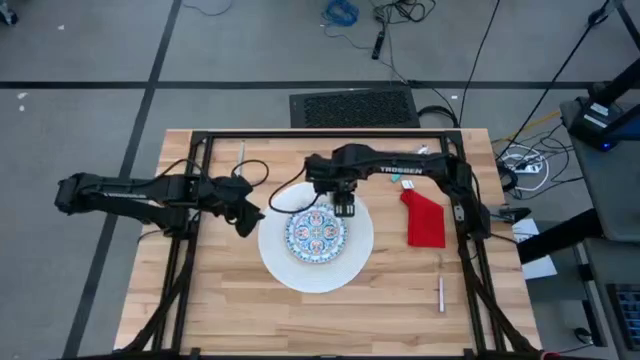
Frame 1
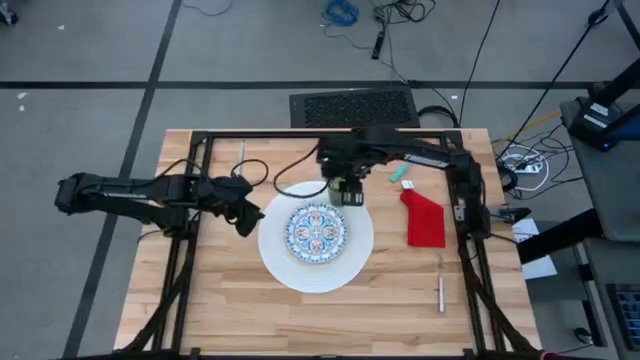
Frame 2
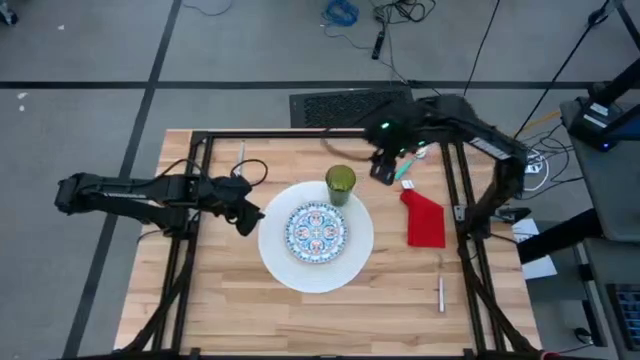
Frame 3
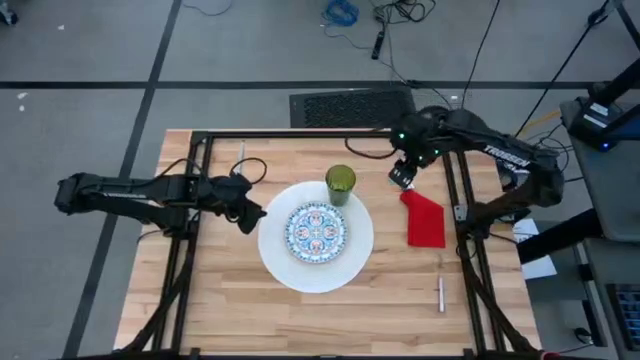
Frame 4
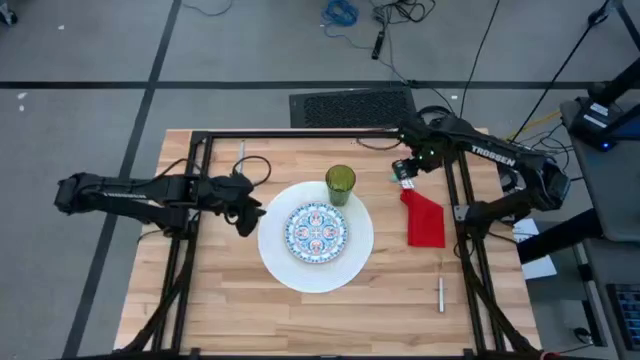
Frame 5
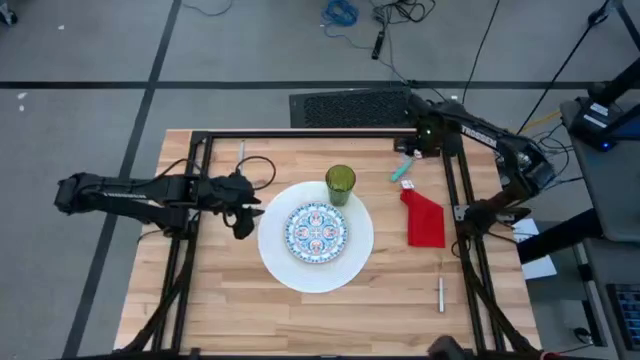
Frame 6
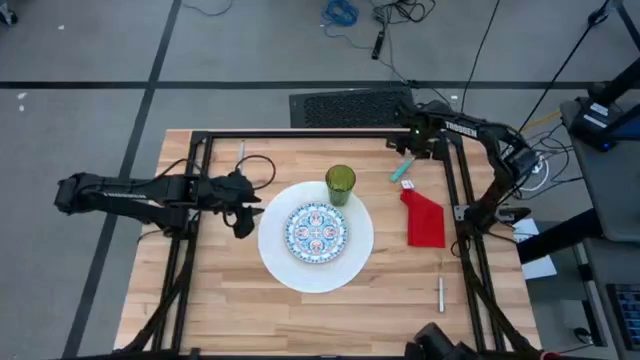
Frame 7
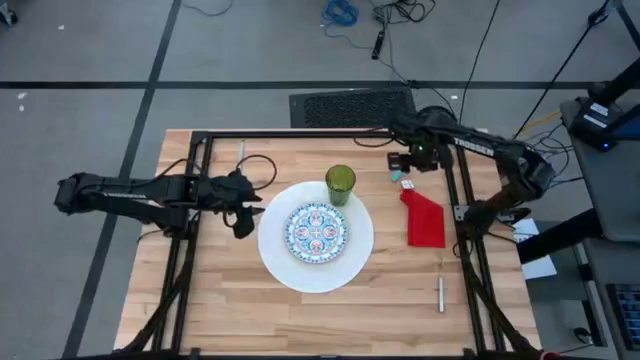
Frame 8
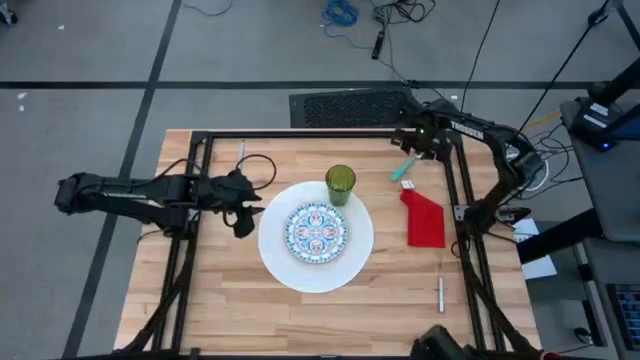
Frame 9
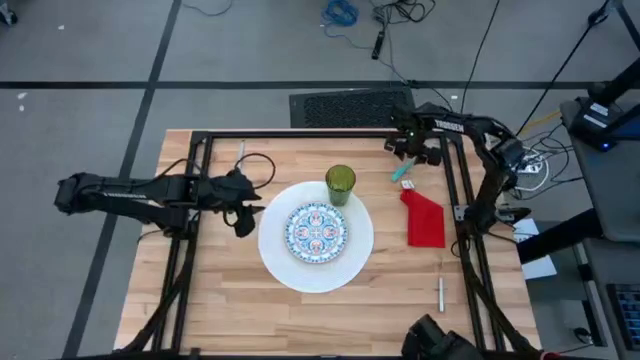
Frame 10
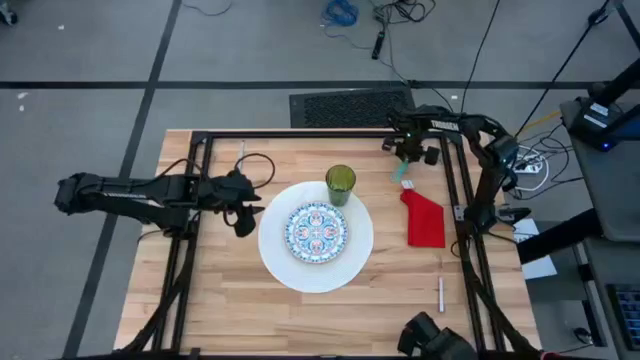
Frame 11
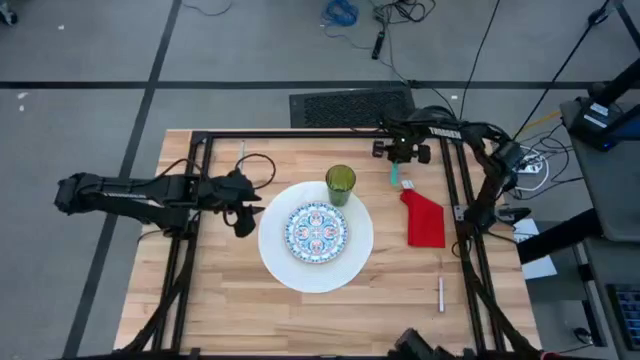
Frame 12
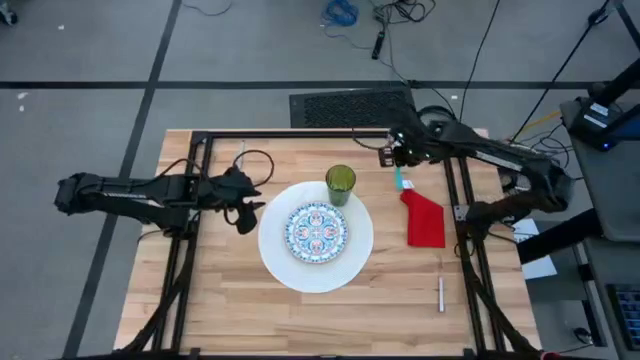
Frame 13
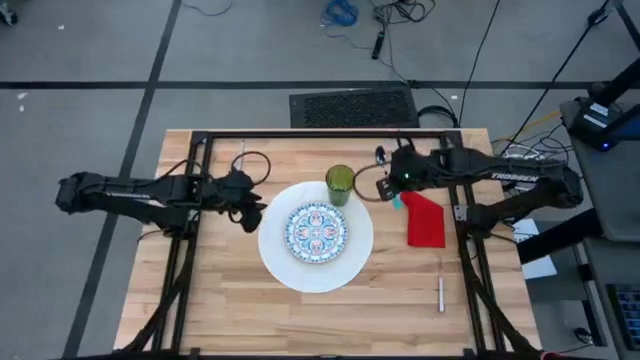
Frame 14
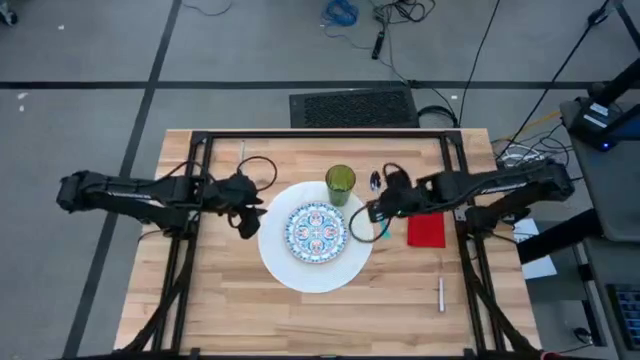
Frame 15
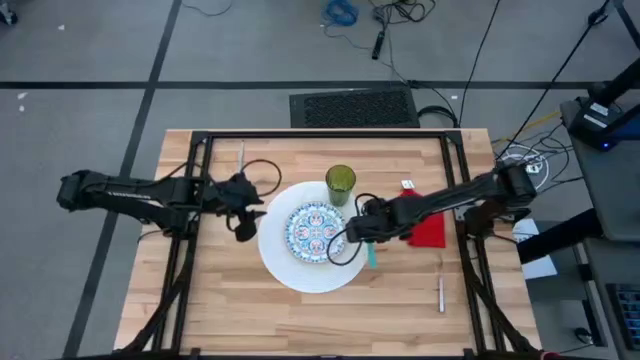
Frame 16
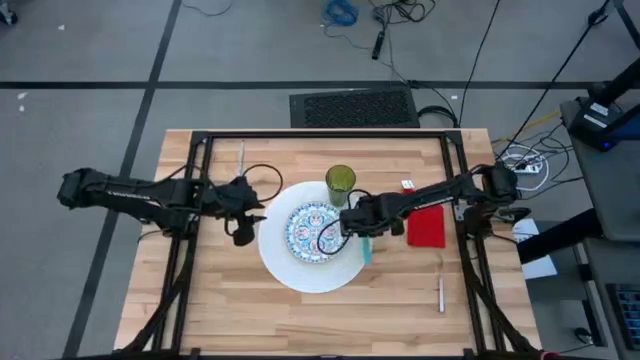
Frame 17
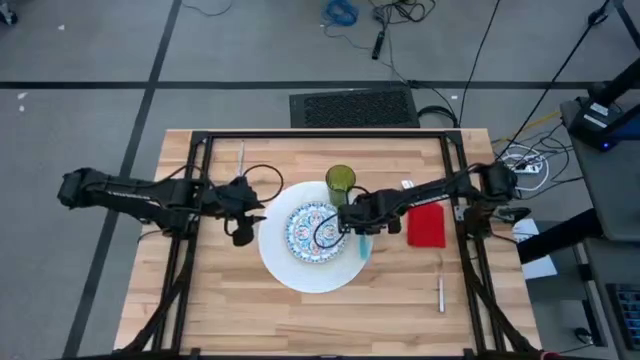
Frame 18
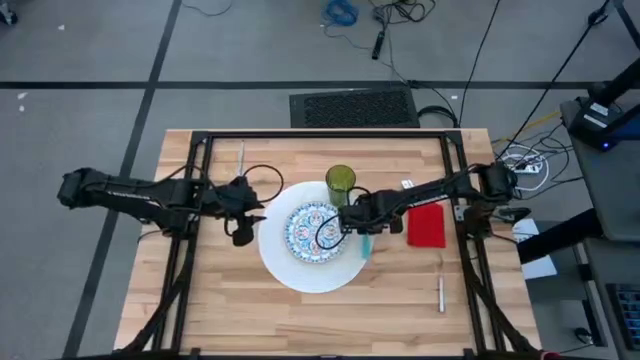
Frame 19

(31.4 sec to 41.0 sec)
Task: Set table place
Put the light blue spoon to the right side of the white plate on the white placemat

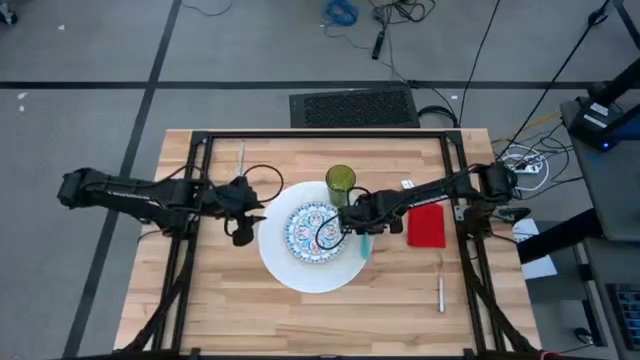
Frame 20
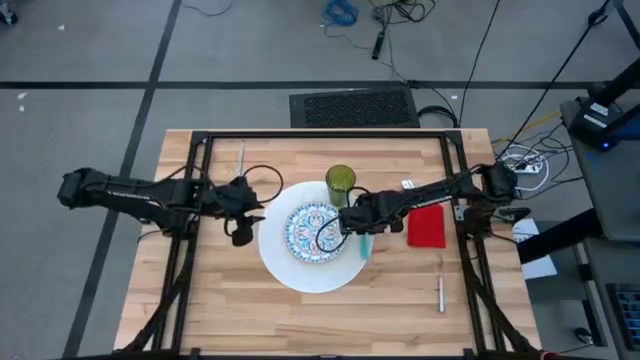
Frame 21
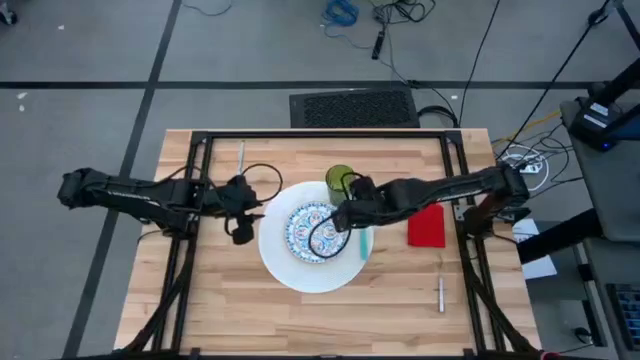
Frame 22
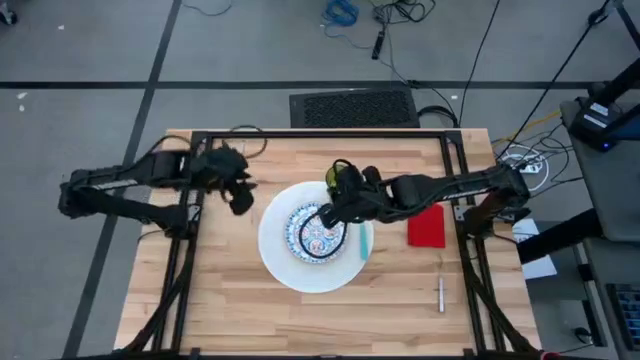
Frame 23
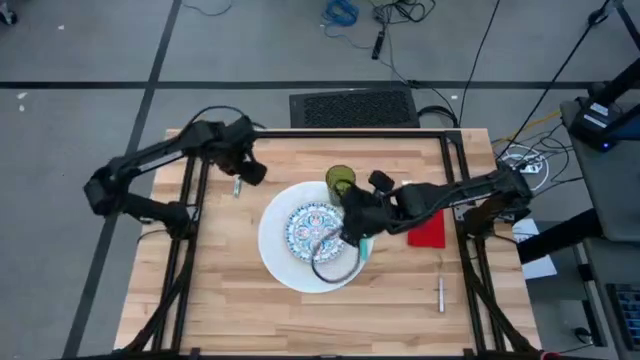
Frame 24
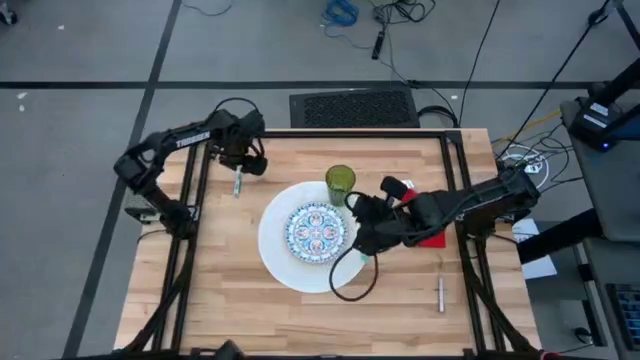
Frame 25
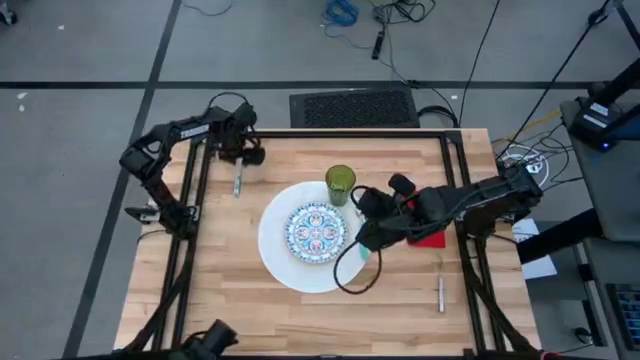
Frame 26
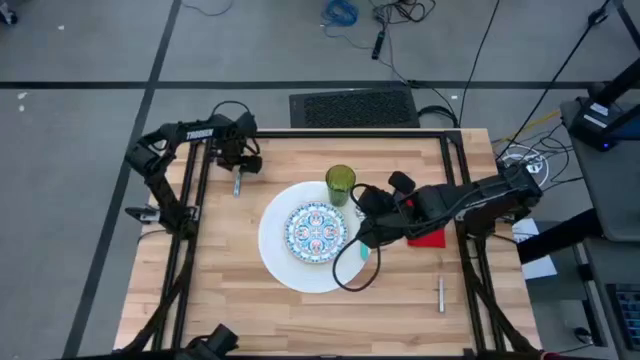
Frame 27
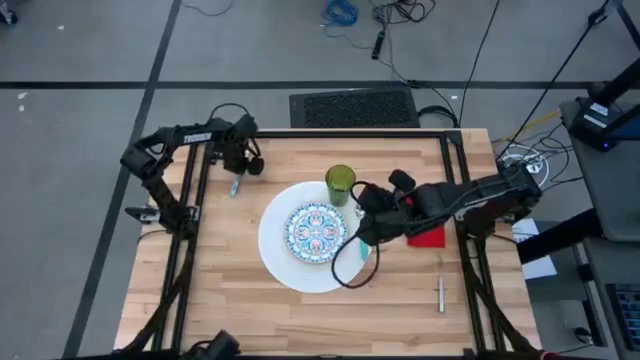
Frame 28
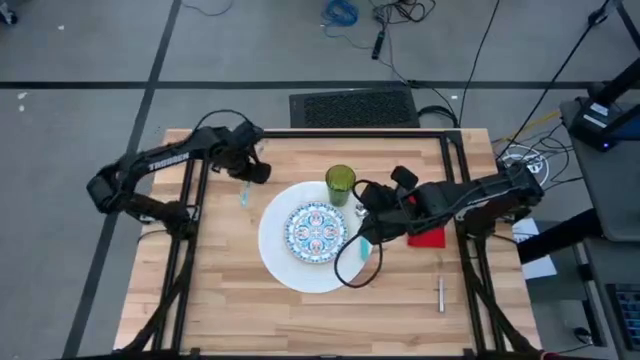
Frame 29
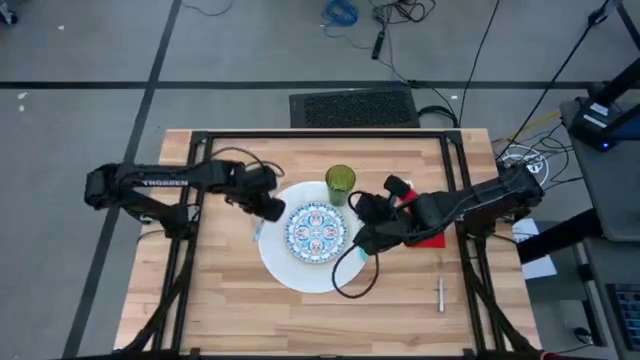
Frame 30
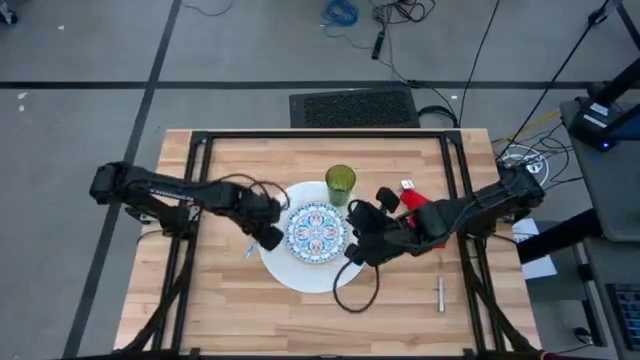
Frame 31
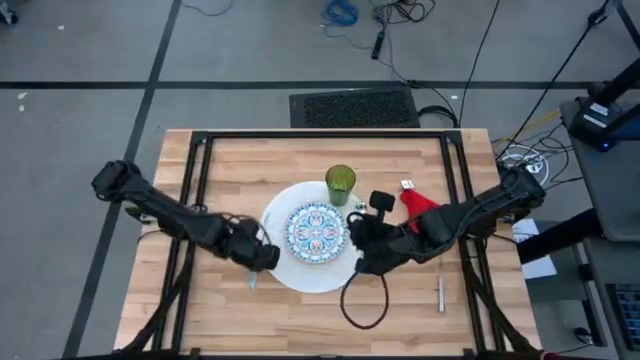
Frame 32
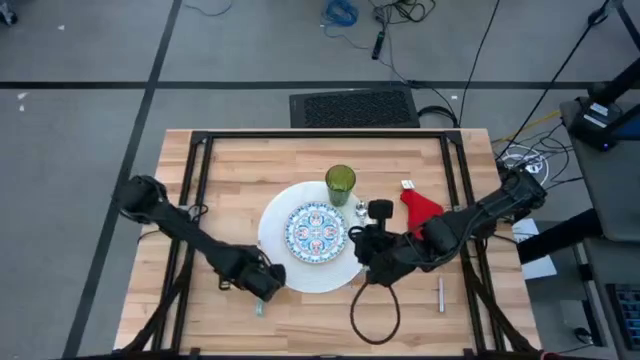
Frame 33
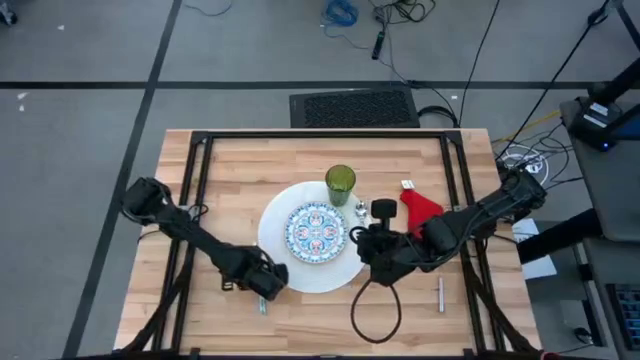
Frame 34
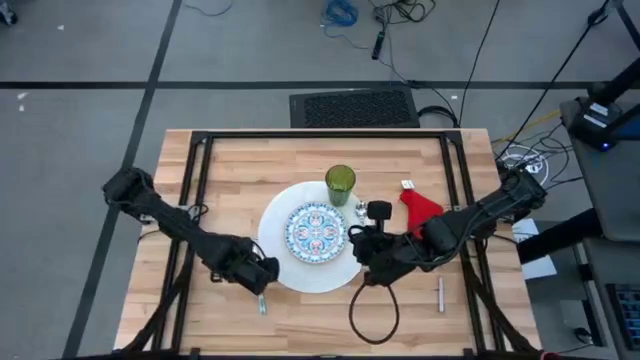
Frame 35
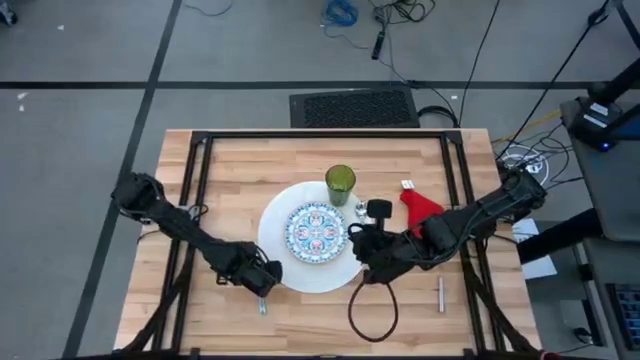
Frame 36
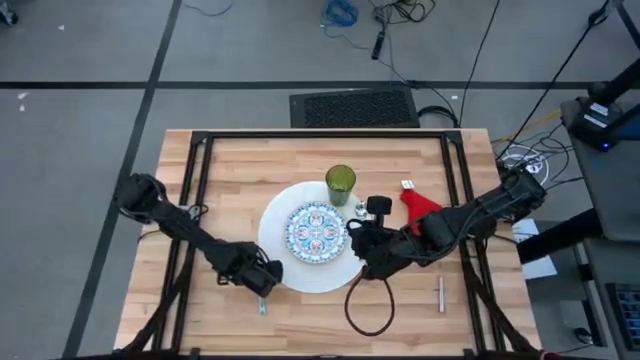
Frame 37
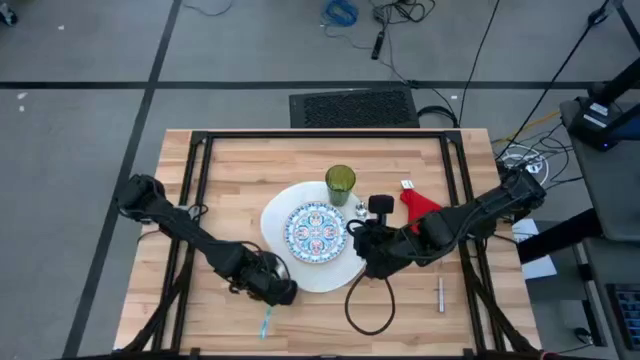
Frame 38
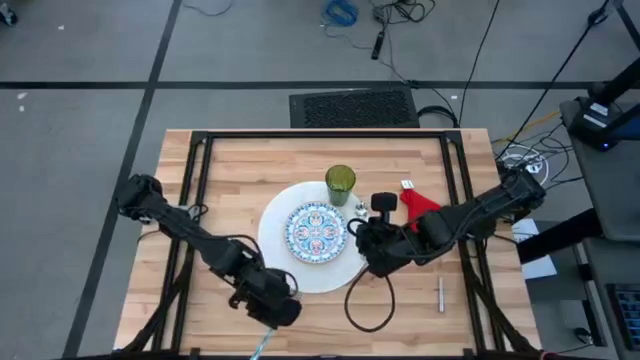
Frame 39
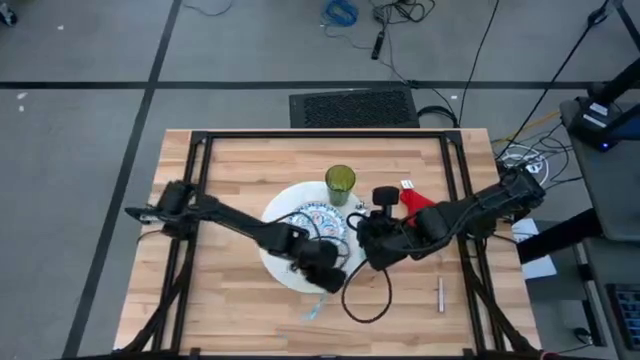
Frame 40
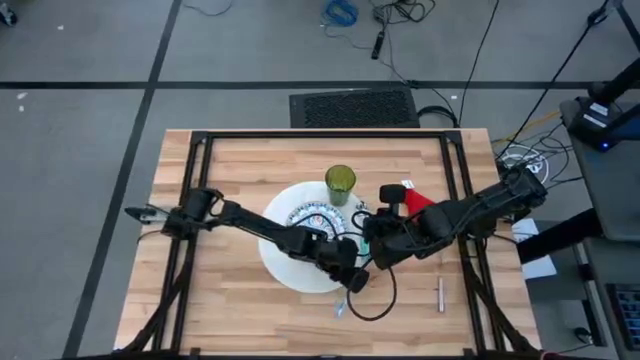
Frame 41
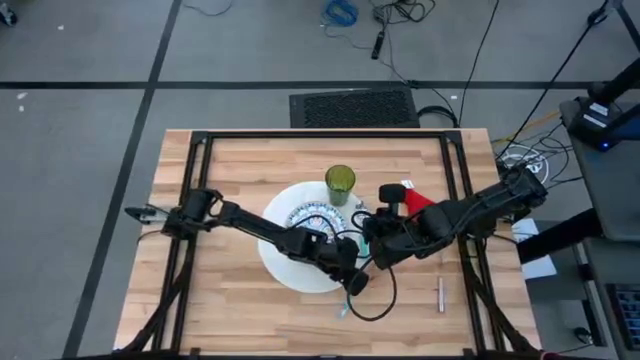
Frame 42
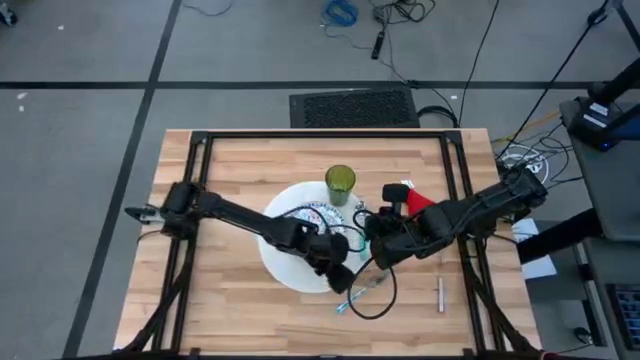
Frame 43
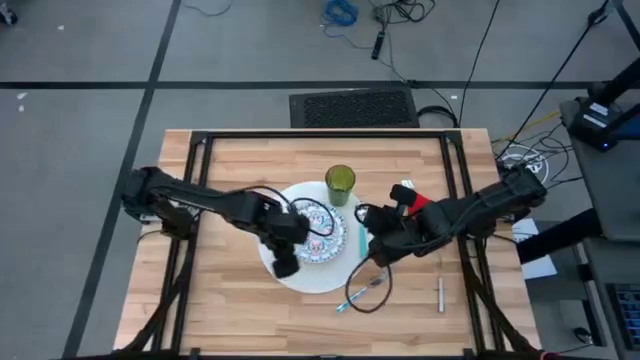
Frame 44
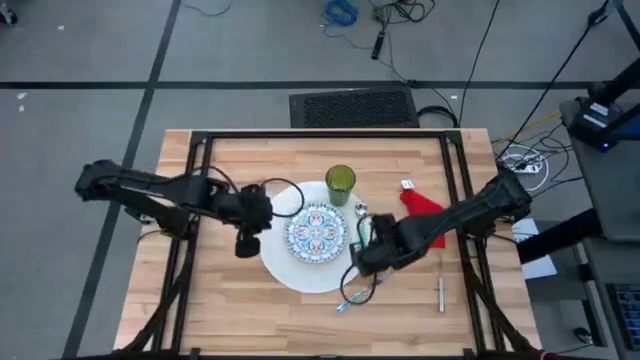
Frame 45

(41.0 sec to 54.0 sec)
Put the white knife between the white plate and light blue on the white table placemat
